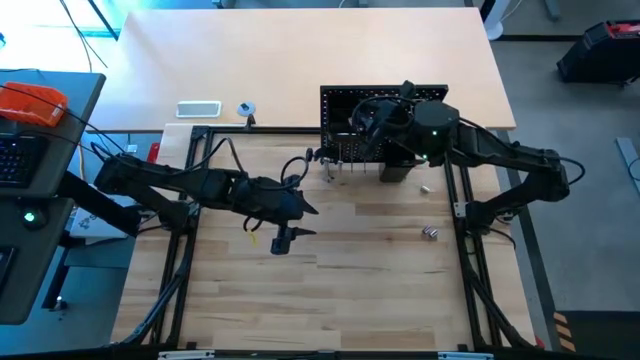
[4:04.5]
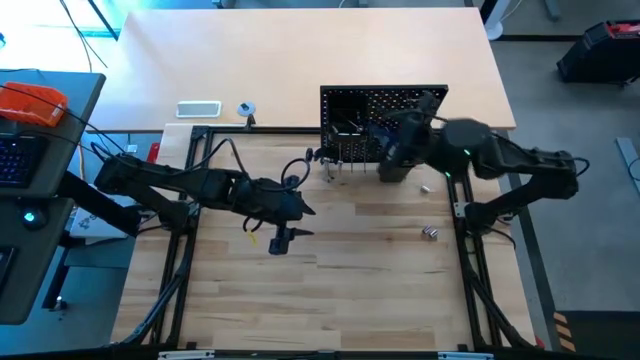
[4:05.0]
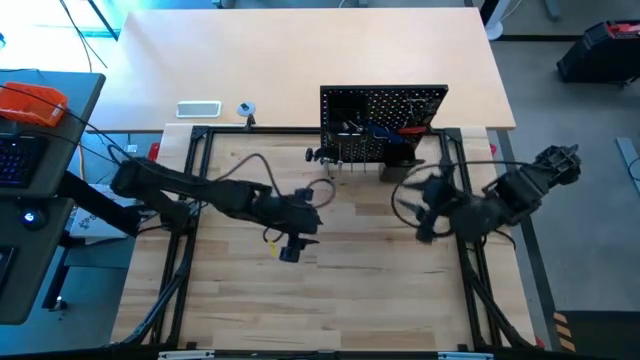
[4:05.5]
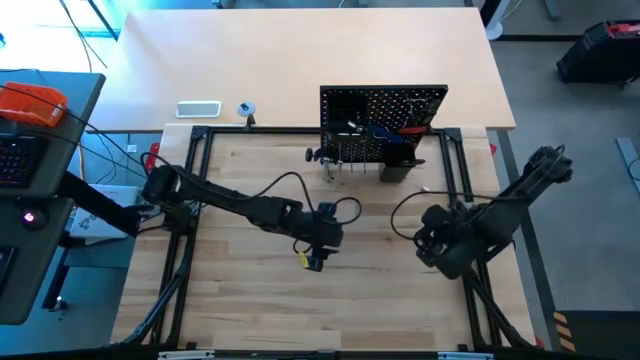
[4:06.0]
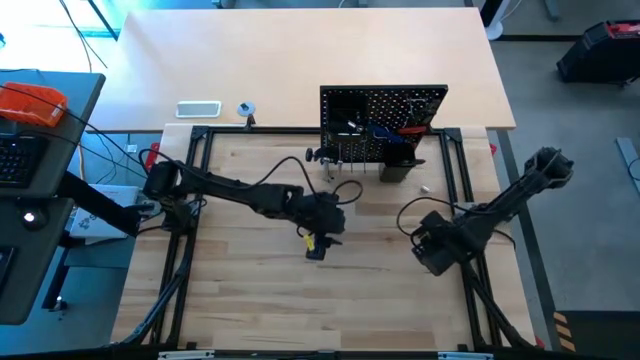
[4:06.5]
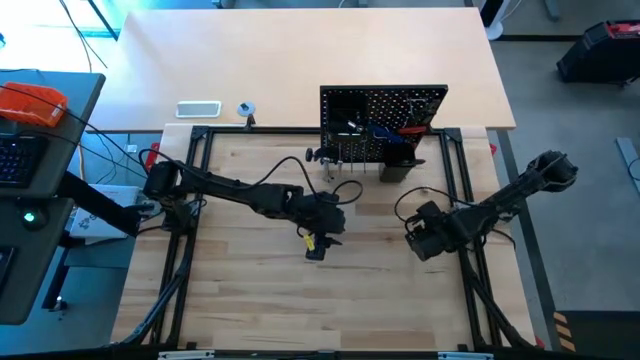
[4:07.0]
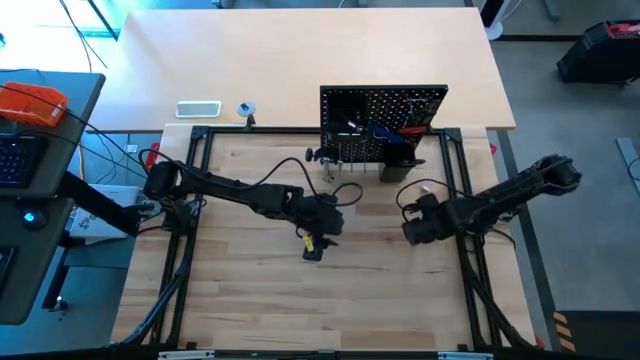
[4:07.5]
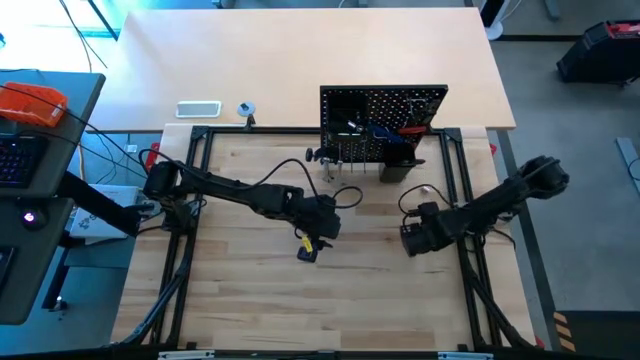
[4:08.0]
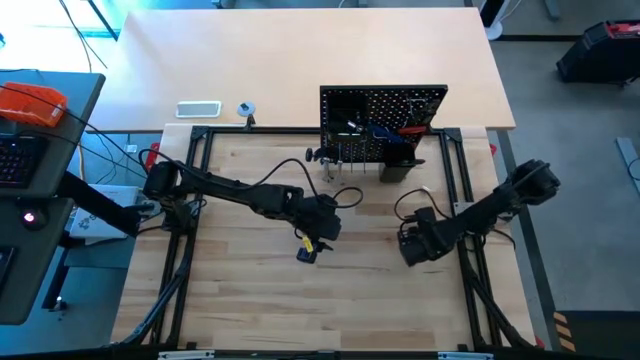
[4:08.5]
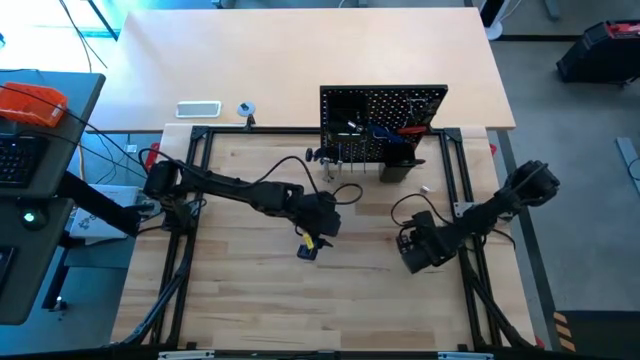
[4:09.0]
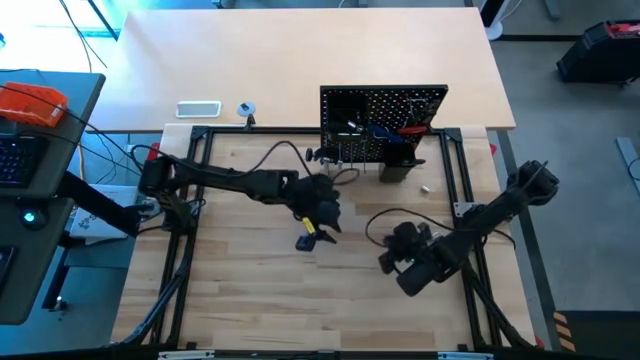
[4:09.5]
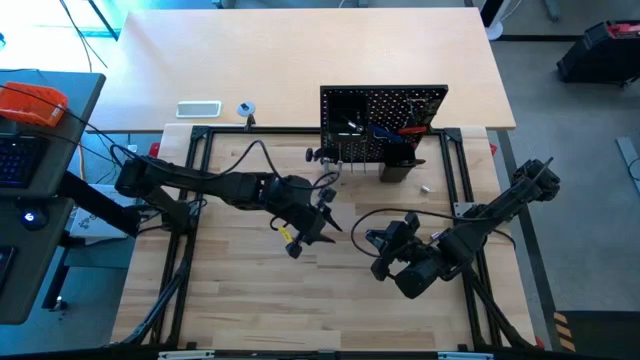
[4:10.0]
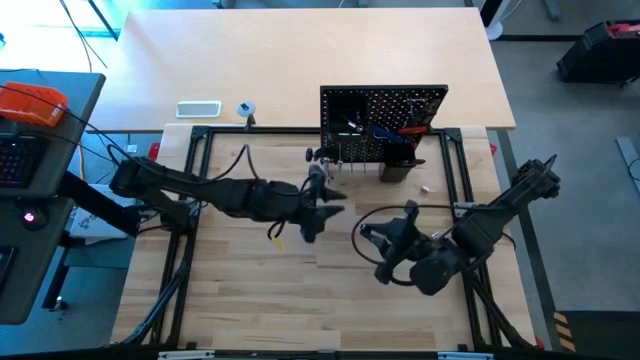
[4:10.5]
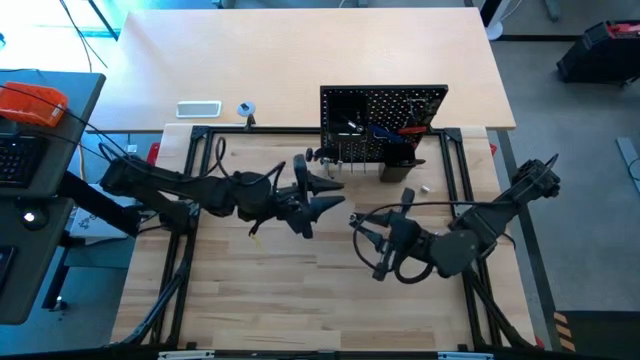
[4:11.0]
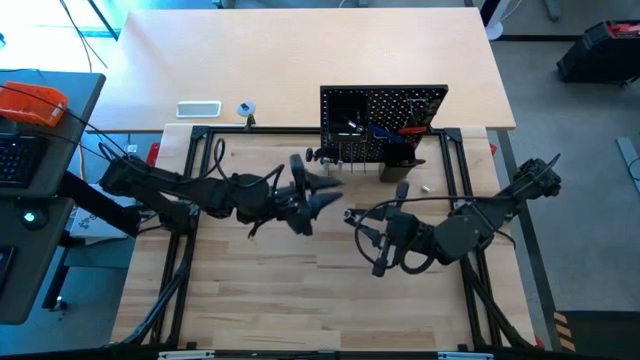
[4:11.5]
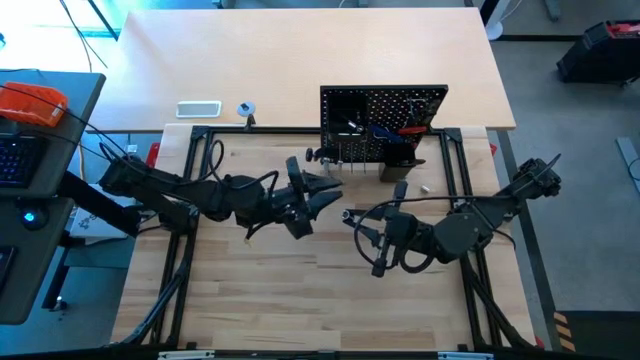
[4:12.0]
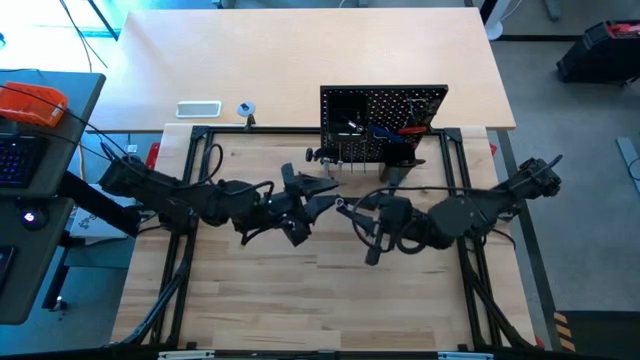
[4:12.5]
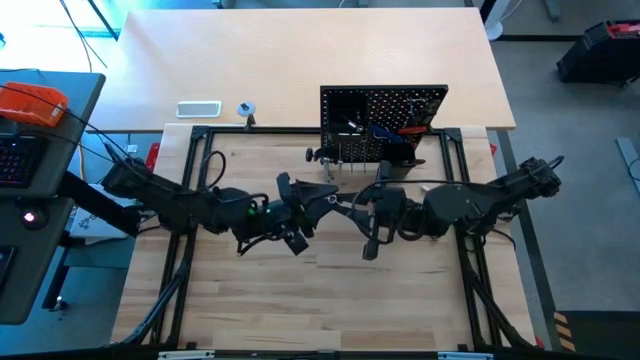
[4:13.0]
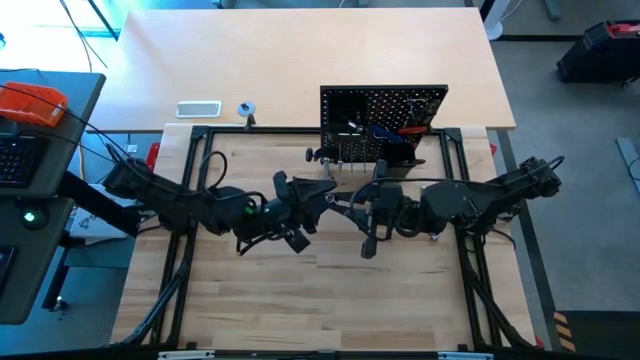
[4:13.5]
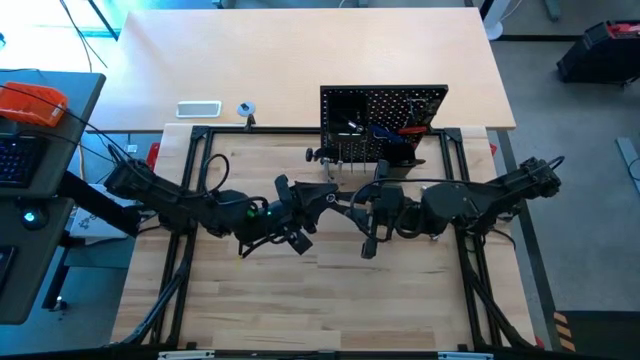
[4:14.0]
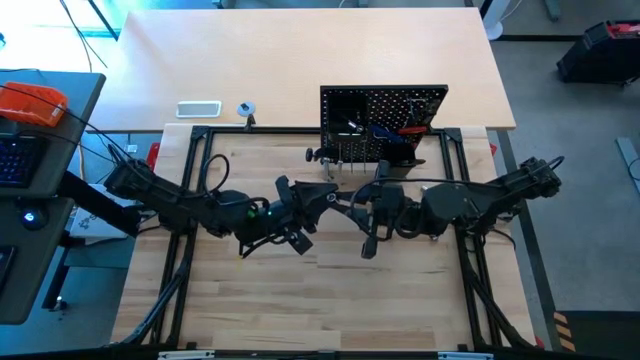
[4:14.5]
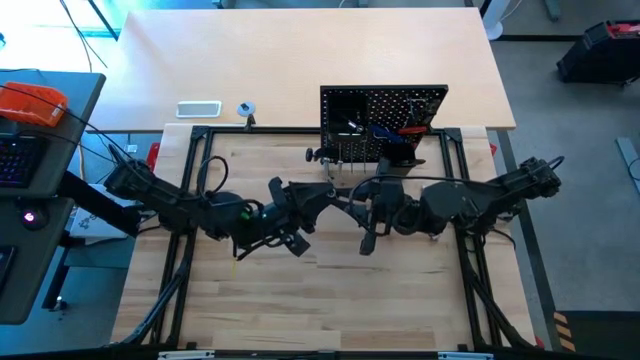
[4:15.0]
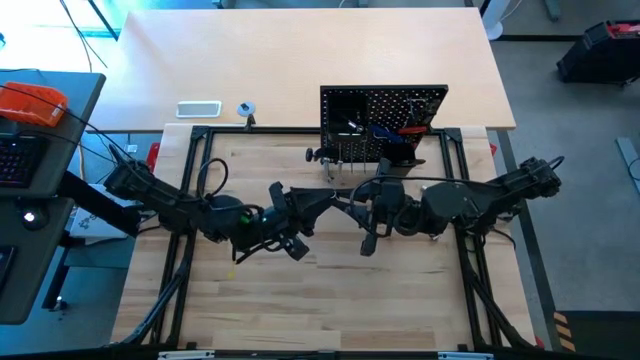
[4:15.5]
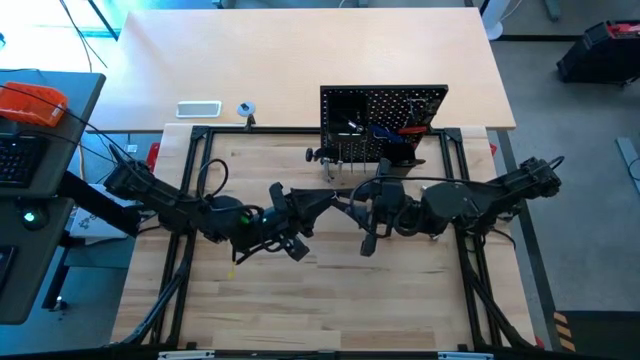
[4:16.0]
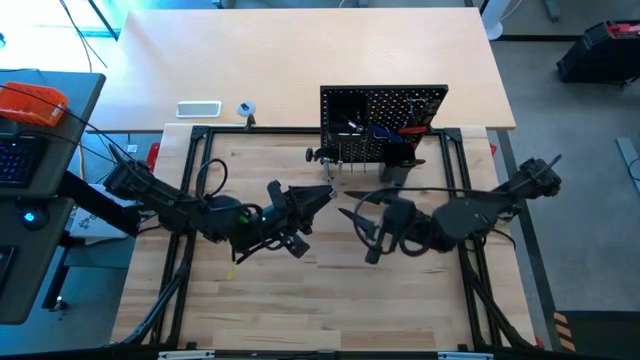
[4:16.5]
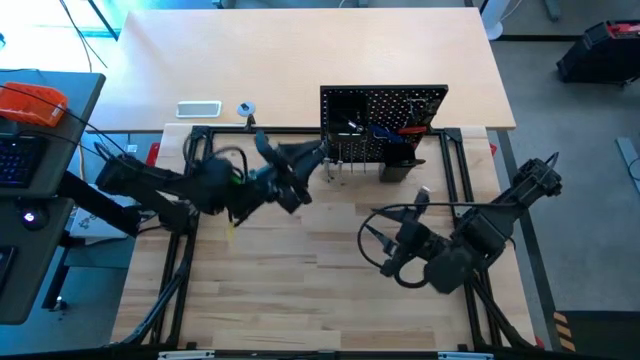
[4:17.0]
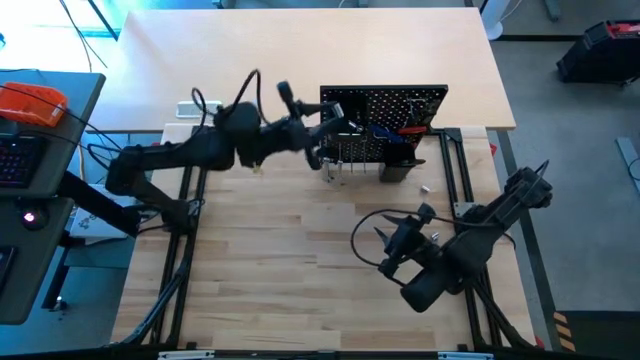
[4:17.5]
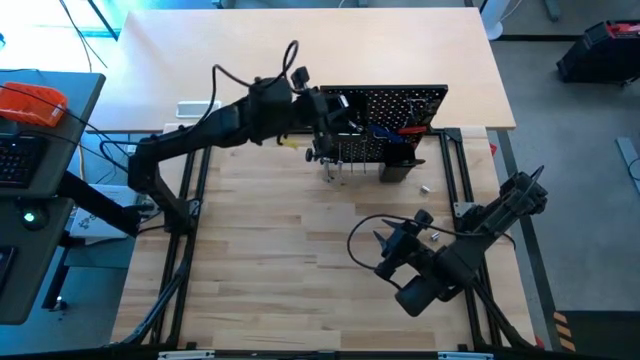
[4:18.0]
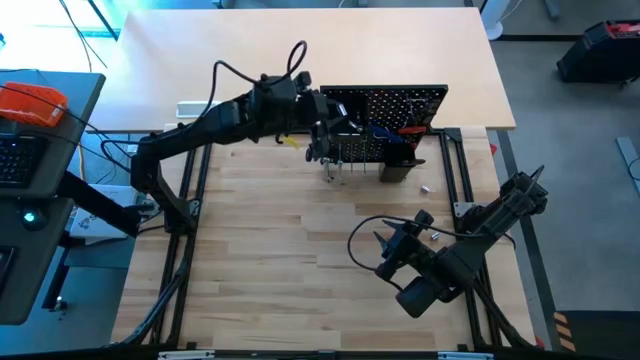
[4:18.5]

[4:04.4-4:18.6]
Task: Hang tools onto peg board
Hang the silver socket onto the pegboard

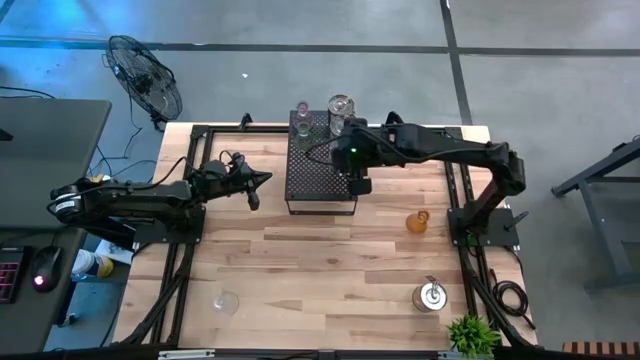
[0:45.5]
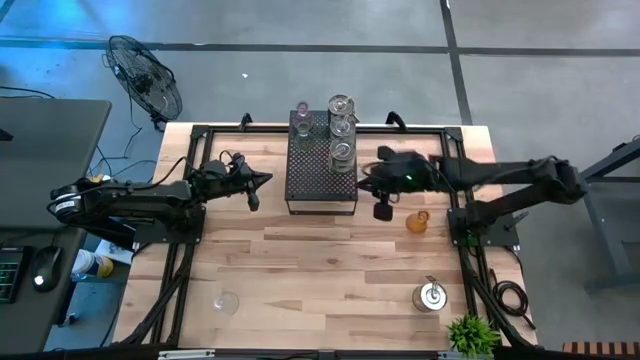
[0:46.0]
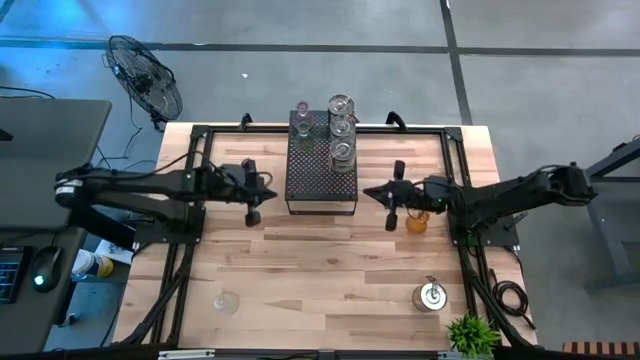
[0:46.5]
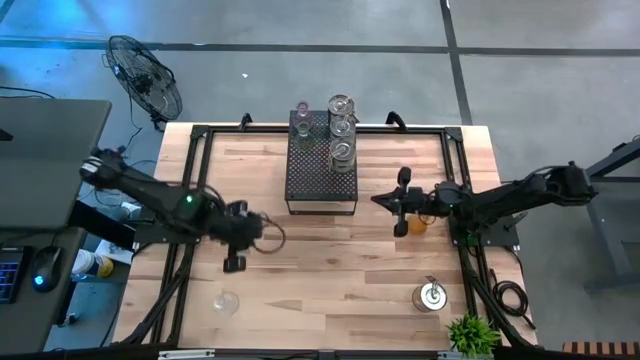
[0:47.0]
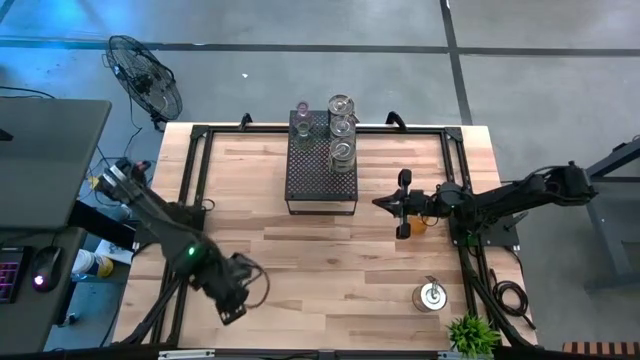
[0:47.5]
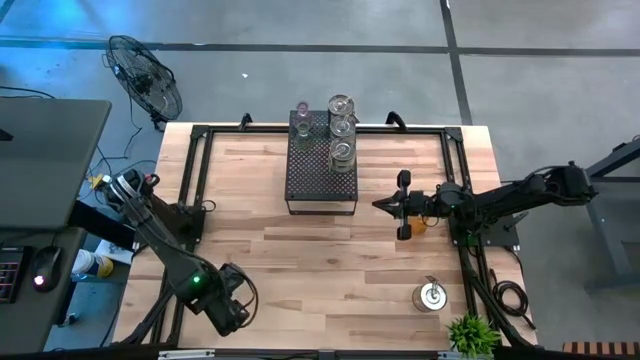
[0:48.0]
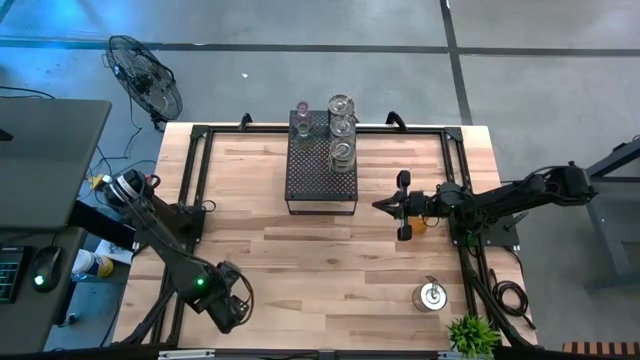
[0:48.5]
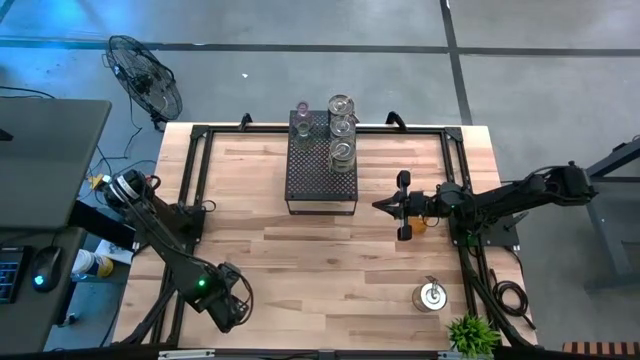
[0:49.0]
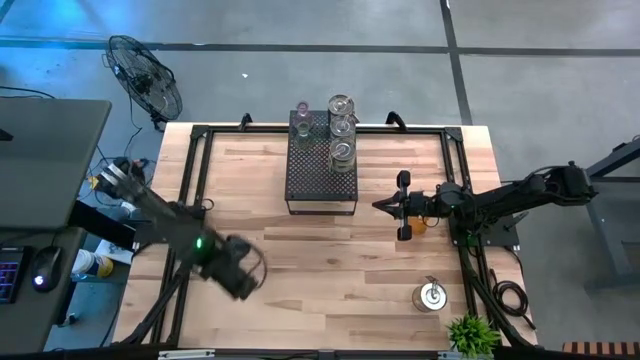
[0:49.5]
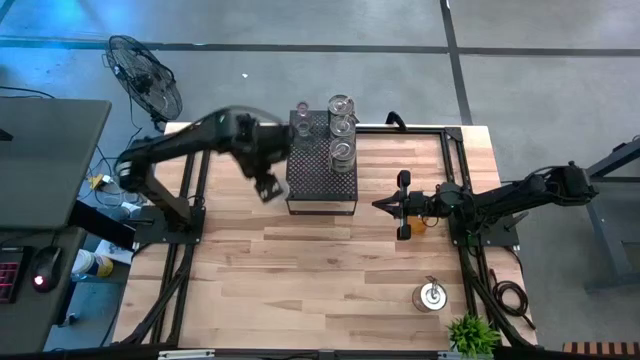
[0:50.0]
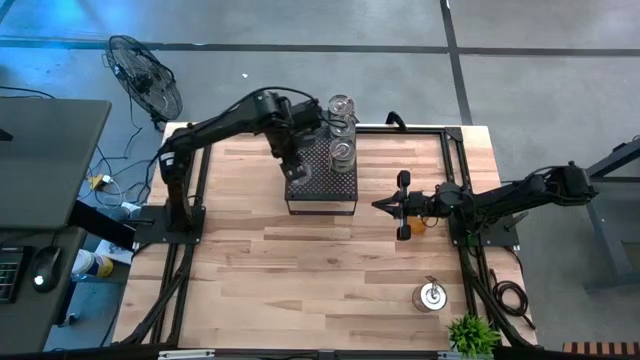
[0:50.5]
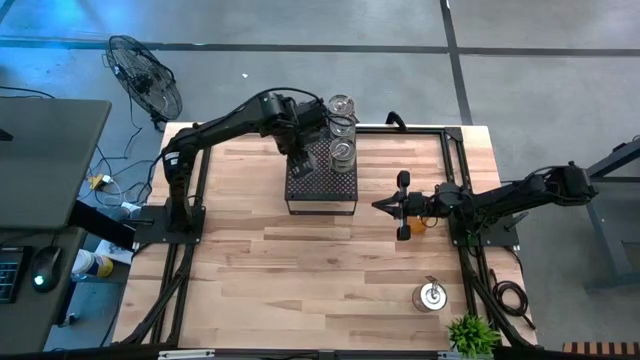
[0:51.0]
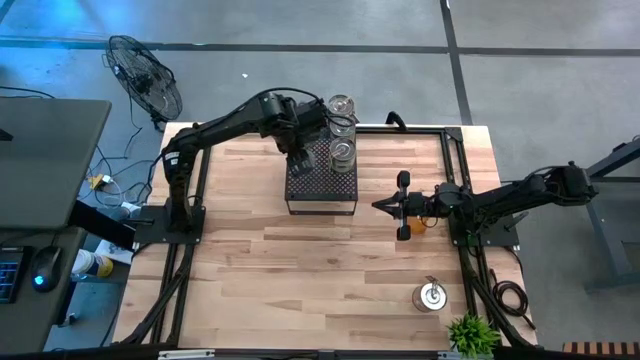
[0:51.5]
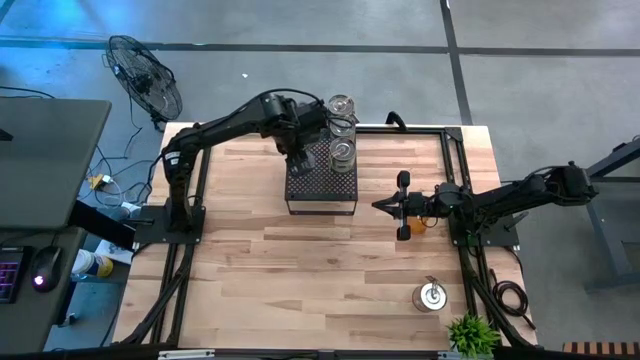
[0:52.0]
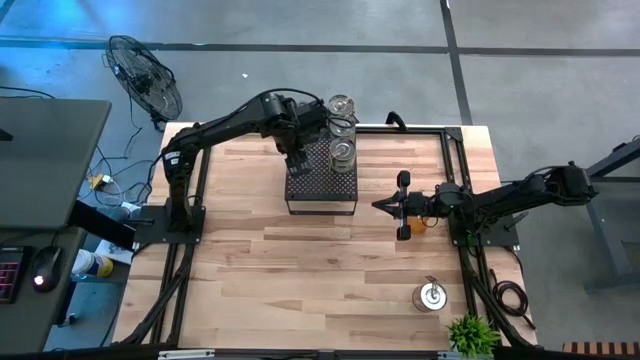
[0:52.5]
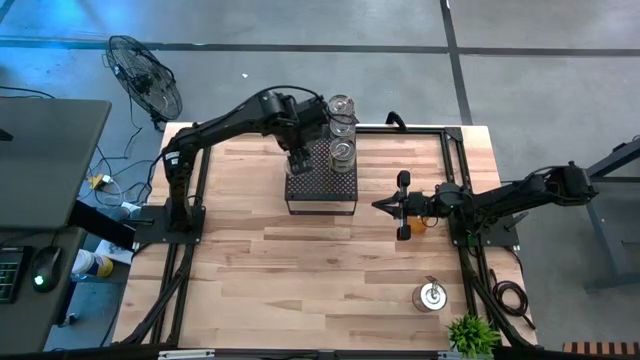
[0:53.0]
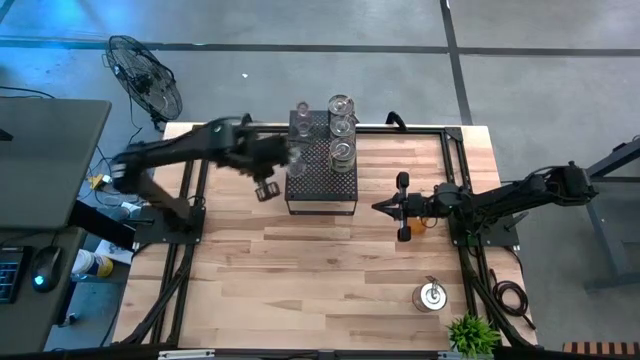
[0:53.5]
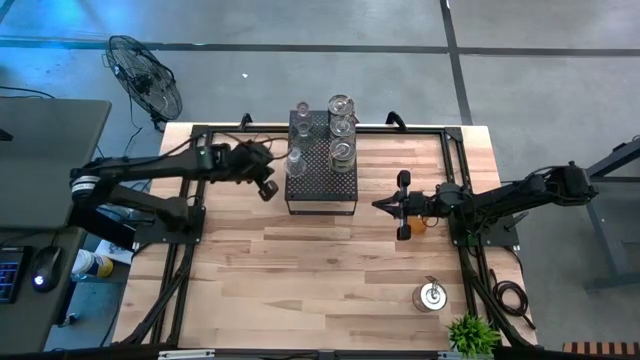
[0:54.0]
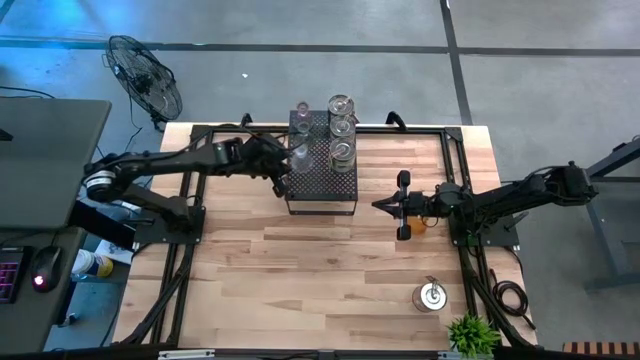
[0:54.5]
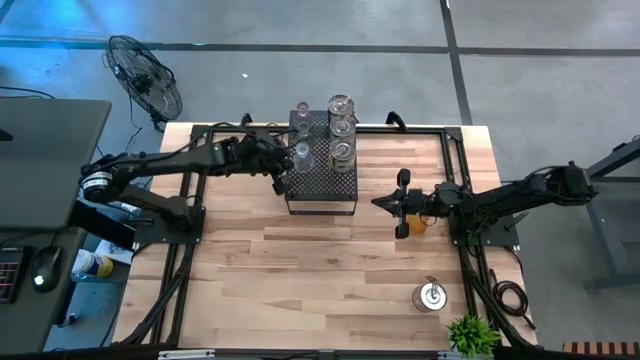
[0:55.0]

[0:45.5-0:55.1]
Task: Pick & Place candle stick holders
Put the transparent glass candle holder on the shelf
